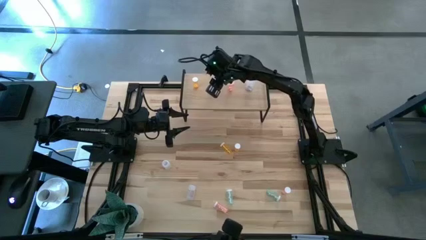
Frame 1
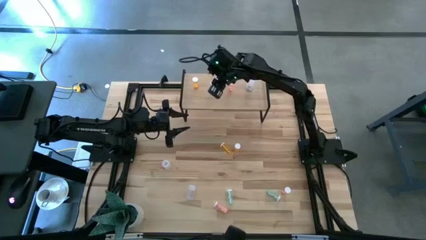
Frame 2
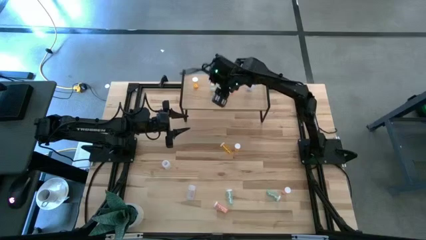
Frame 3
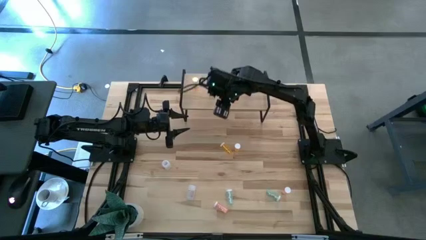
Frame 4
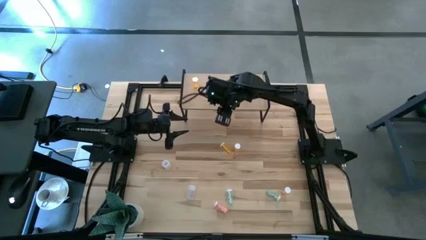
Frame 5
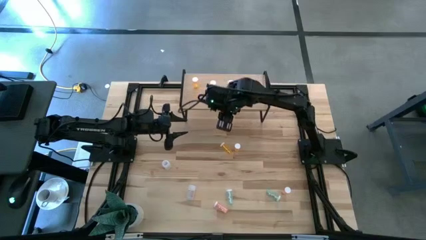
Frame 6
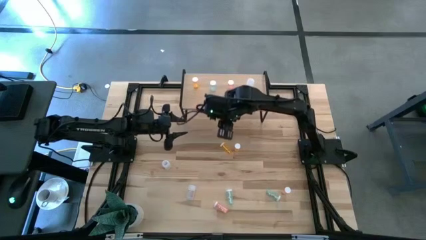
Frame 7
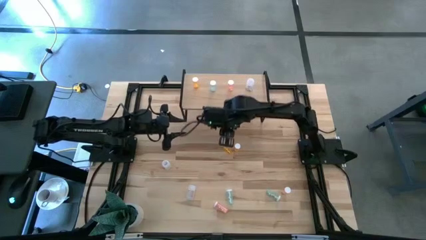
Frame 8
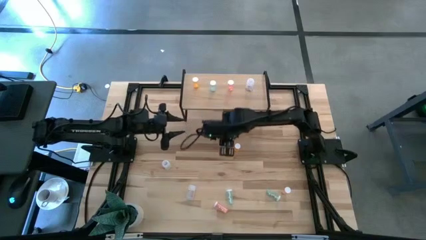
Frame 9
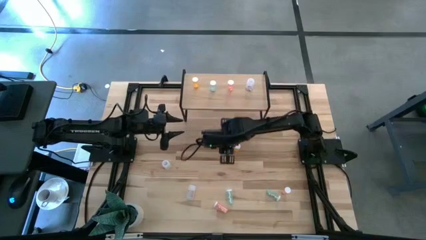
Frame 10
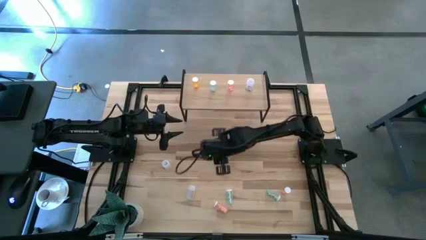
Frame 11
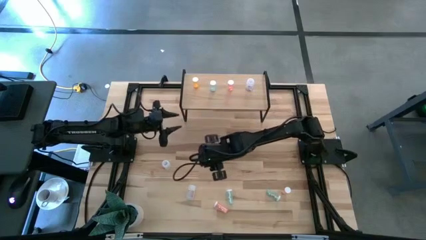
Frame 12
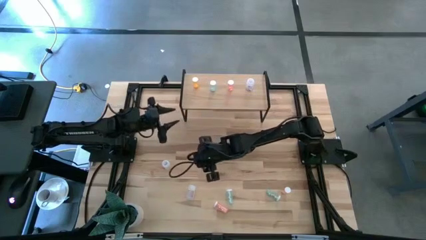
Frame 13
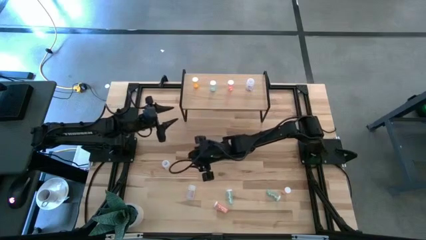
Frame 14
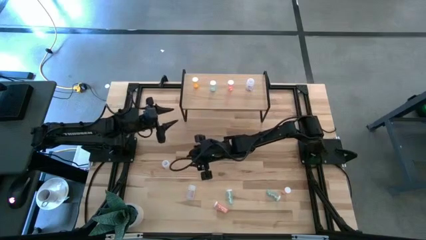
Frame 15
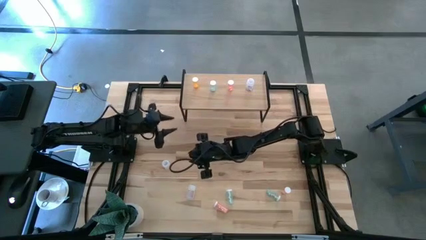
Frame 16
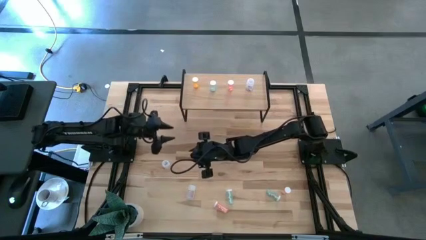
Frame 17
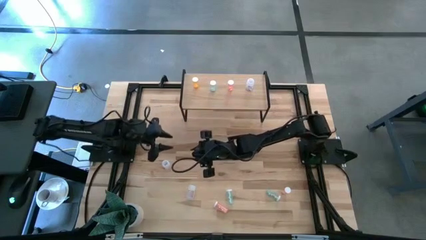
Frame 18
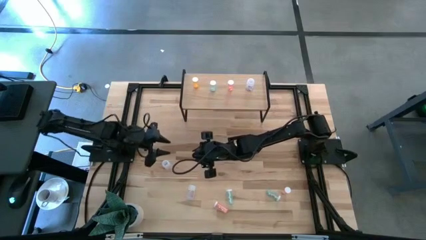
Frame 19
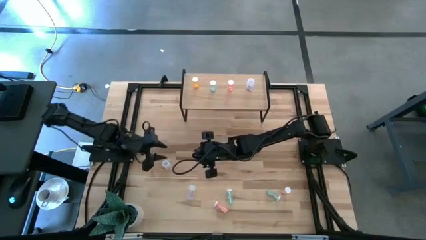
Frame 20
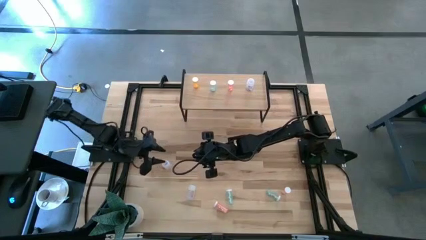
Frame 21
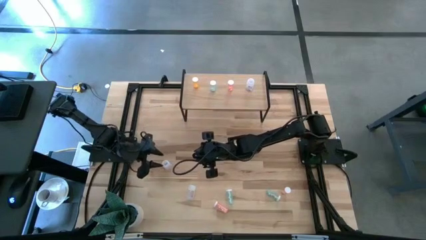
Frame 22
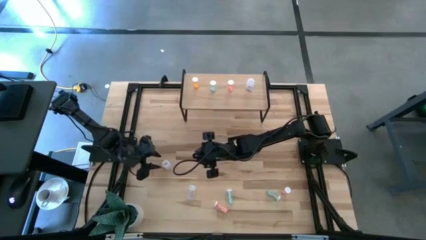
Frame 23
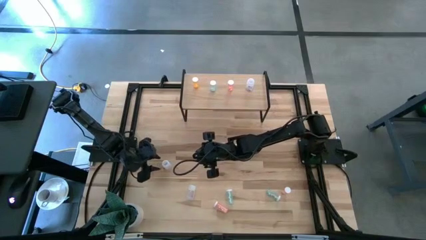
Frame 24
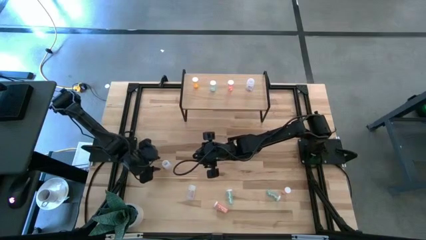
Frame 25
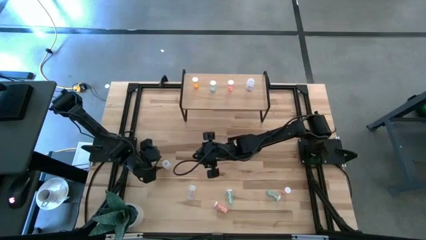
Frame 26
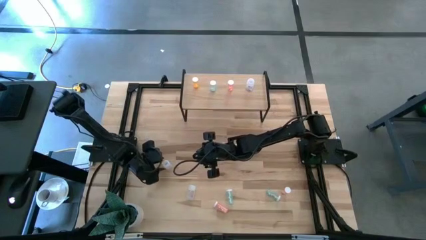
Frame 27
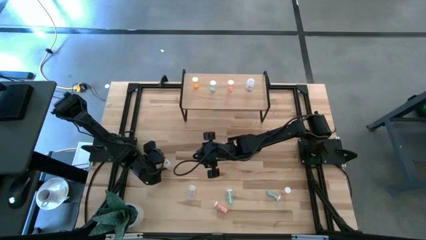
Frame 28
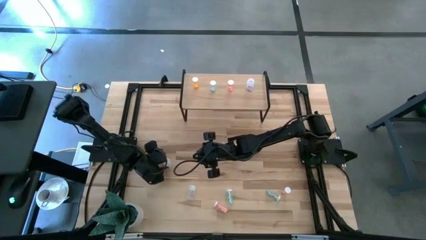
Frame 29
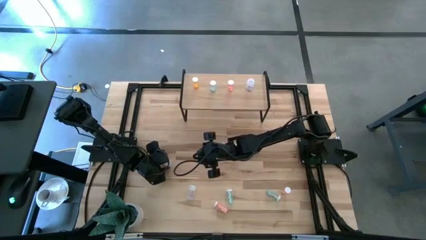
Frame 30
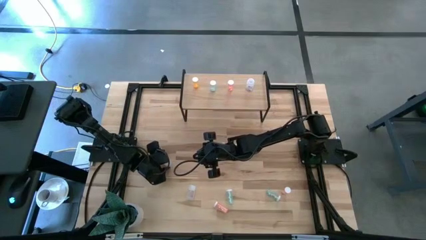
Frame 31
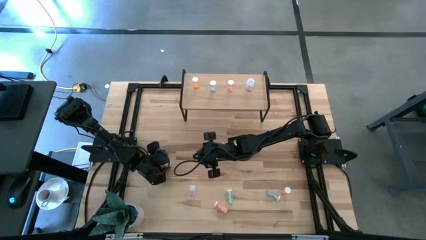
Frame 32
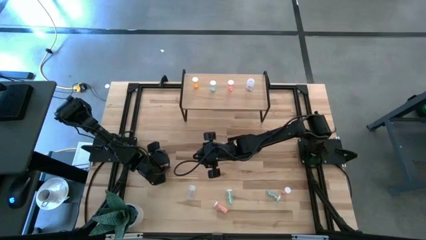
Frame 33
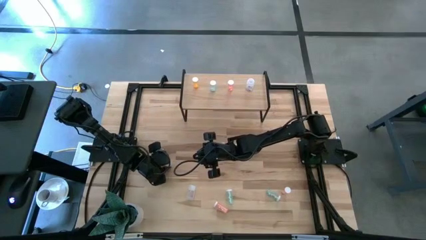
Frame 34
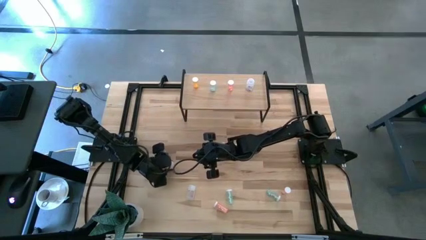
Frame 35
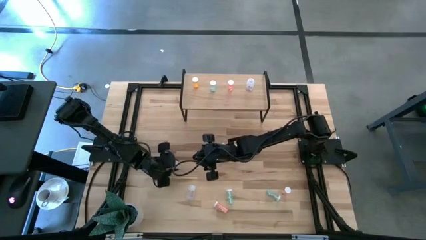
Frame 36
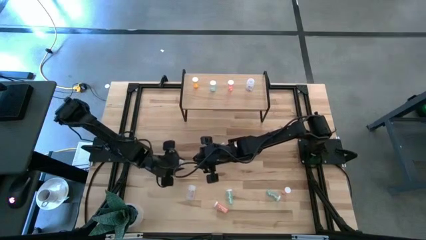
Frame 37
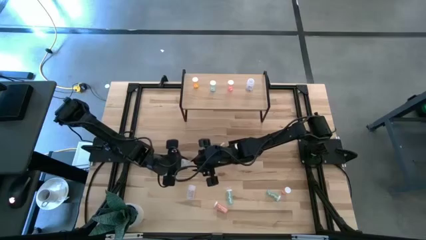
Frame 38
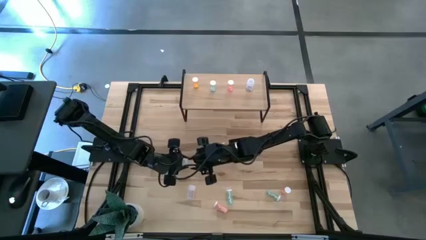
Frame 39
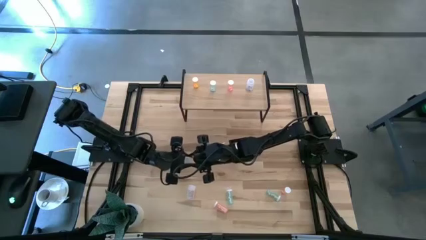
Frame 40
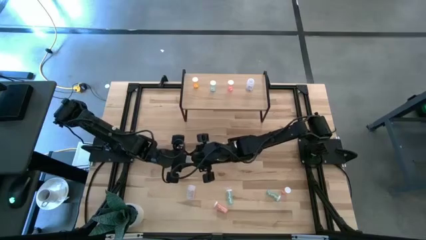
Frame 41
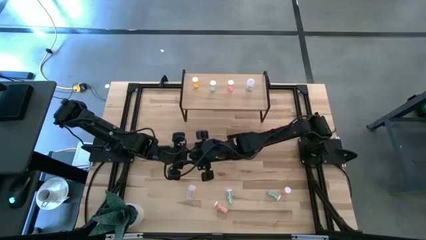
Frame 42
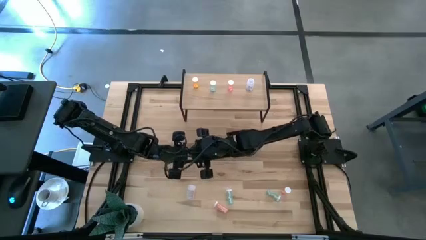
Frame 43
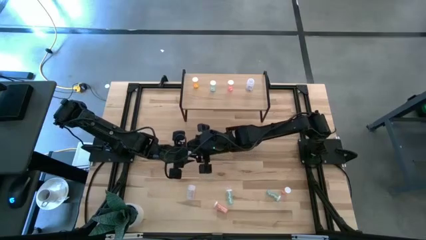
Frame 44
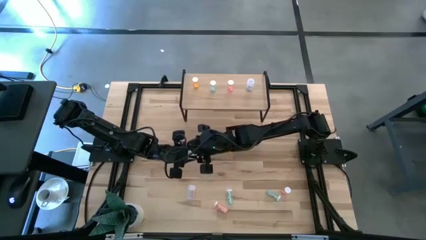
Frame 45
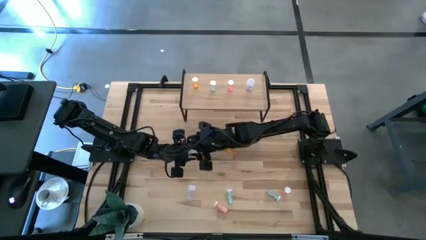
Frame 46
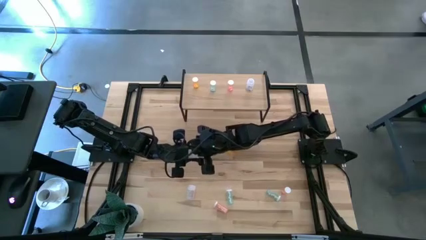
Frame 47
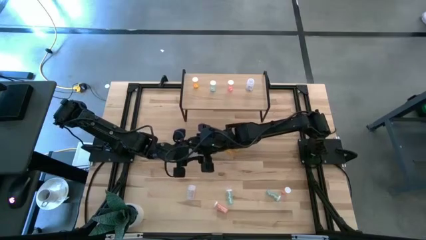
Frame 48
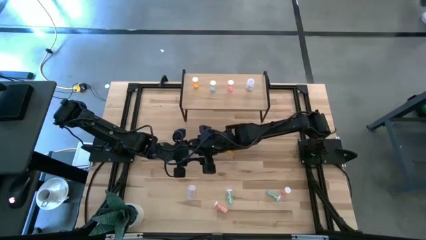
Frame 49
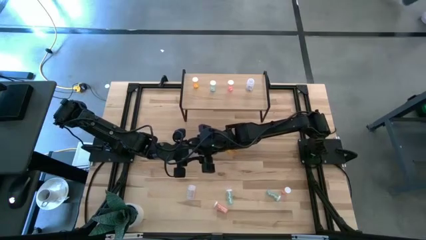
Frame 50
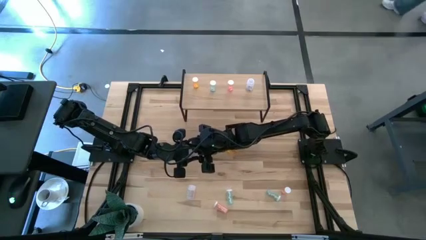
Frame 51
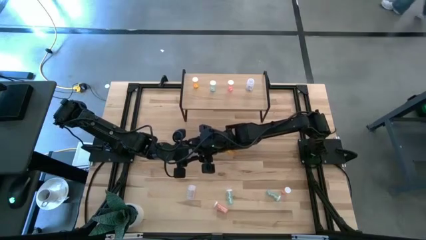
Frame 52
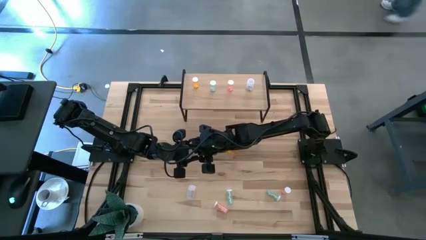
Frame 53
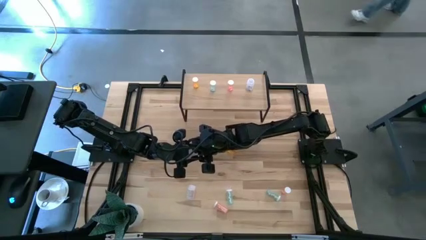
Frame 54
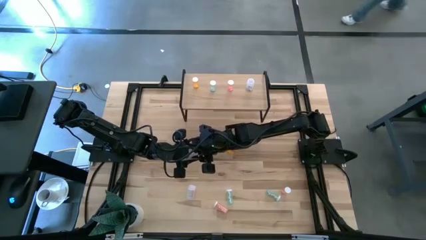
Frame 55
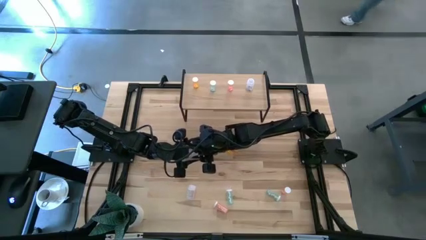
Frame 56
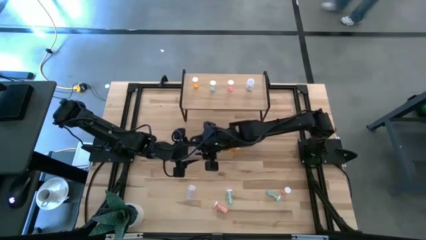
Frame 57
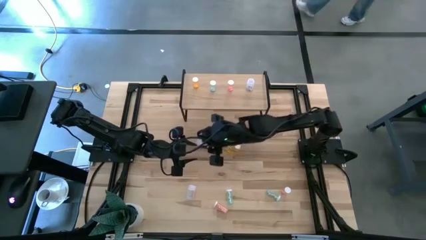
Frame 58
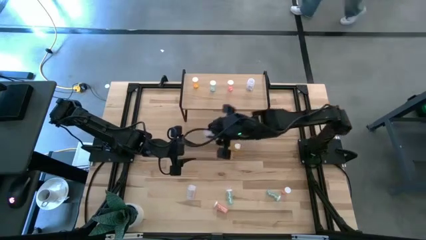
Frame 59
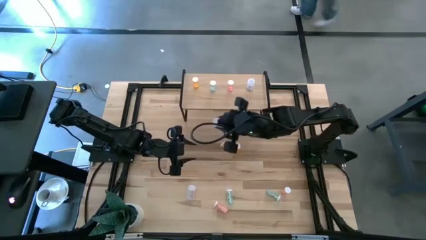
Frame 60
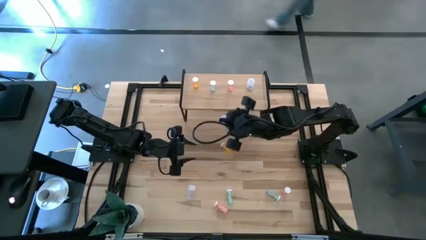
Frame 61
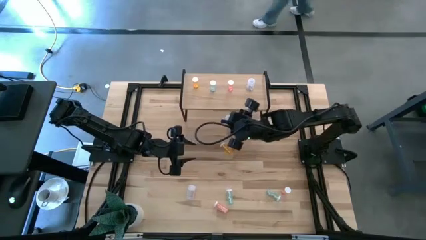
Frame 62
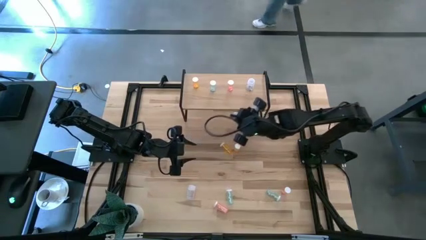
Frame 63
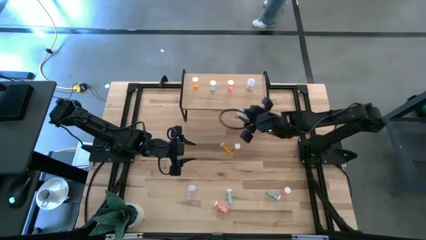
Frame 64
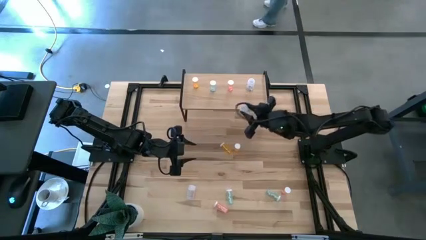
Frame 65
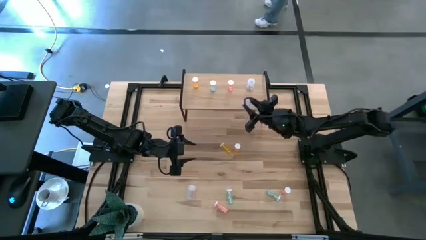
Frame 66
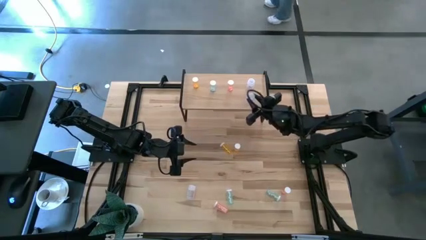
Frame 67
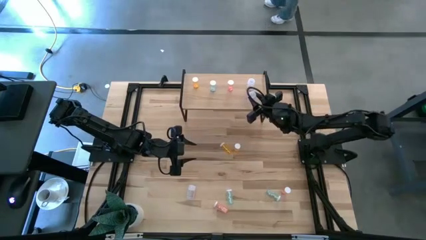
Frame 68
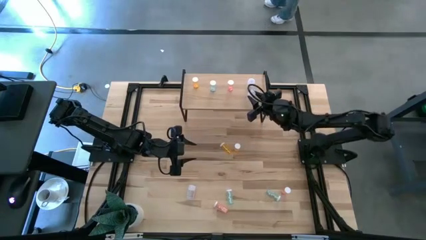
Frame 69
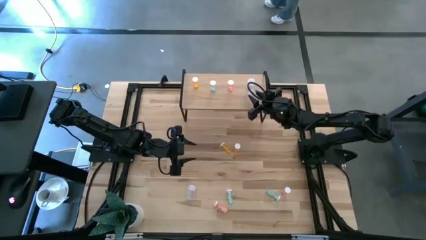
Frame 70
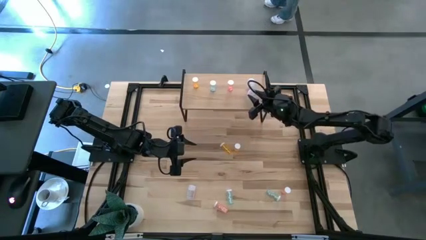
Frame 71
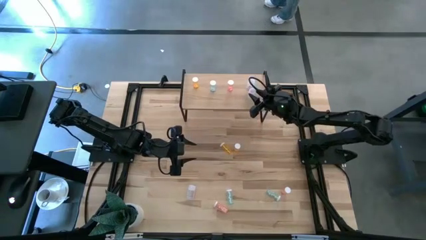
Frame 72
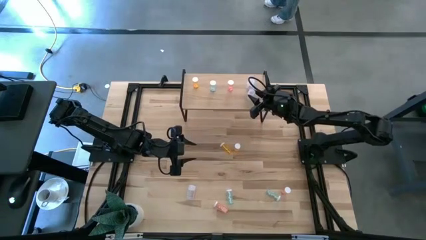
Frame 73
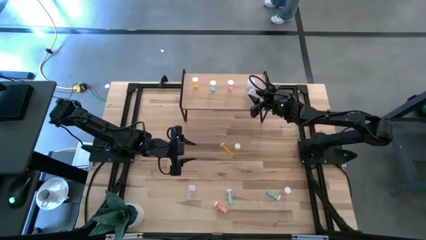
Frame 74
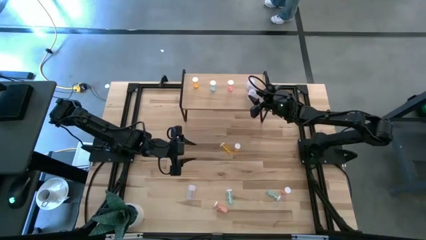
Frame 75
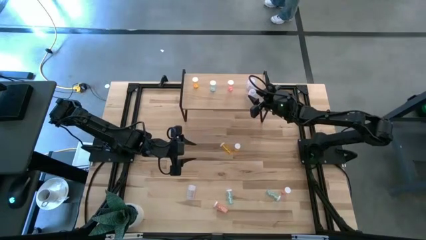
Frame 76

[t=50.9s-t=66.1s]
Task: Pick and place medicine bottles onto shelf by color
Put the transparent pill bottle on the shelf aligned with the transparent pill bottle
